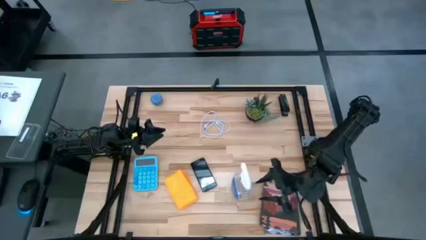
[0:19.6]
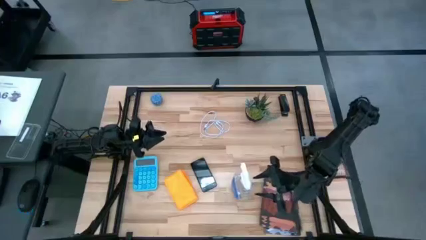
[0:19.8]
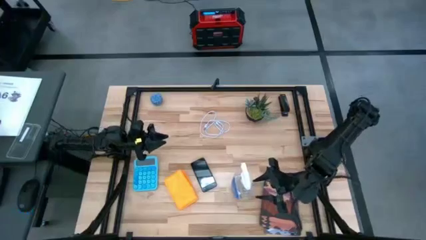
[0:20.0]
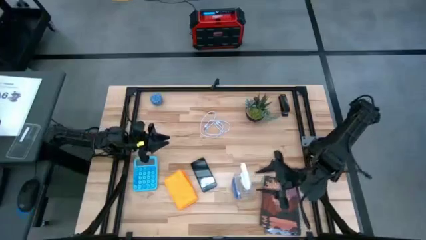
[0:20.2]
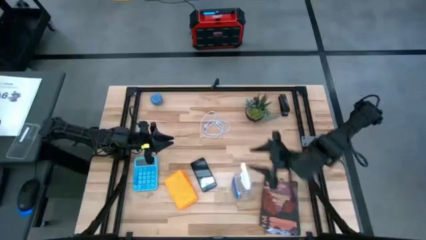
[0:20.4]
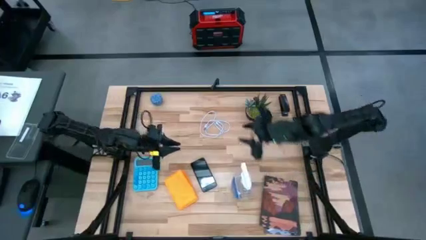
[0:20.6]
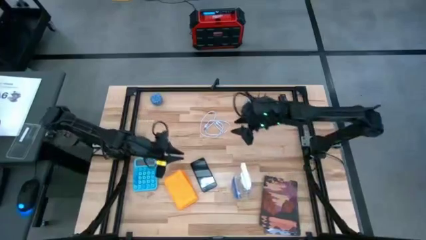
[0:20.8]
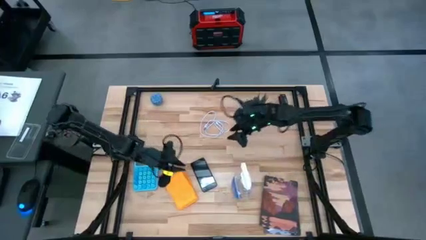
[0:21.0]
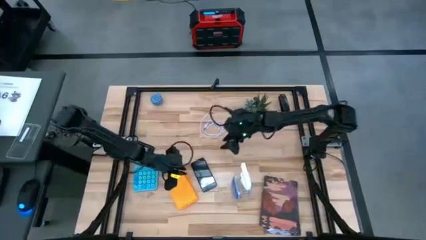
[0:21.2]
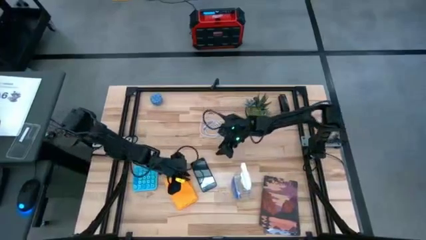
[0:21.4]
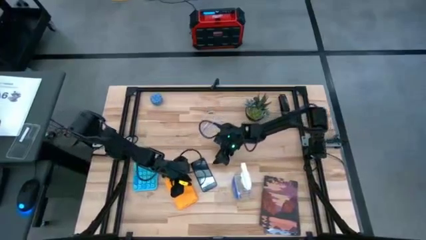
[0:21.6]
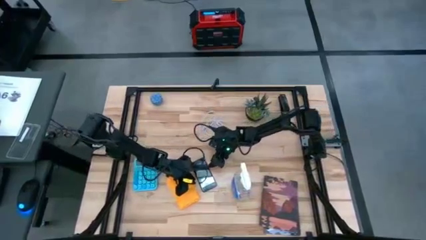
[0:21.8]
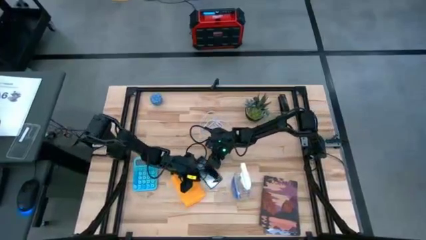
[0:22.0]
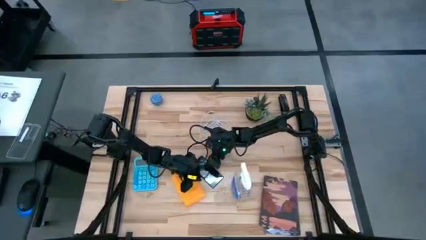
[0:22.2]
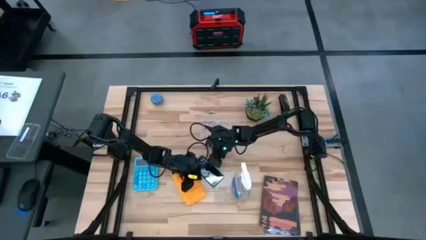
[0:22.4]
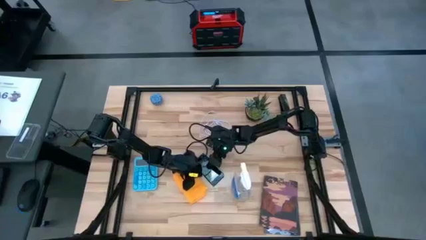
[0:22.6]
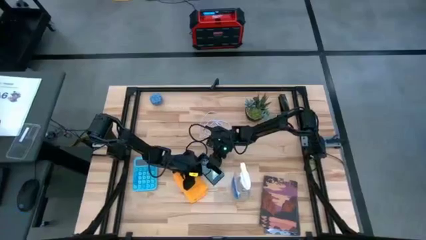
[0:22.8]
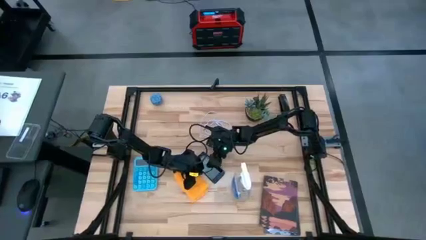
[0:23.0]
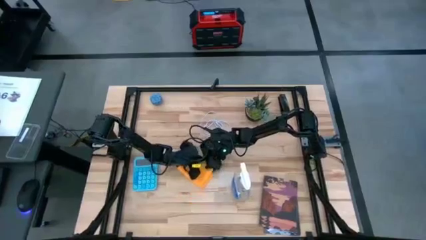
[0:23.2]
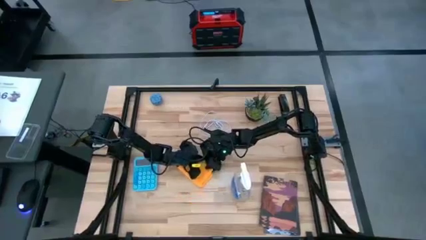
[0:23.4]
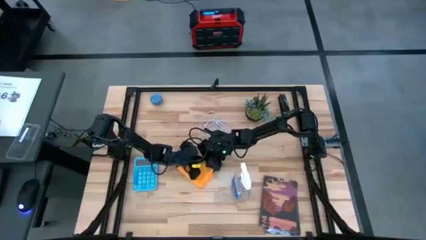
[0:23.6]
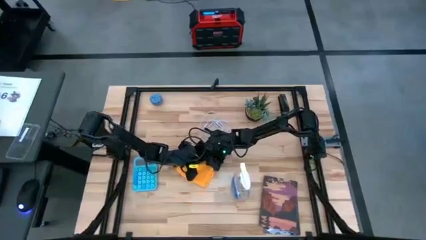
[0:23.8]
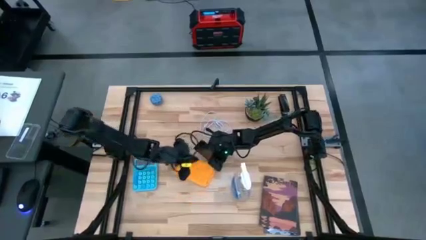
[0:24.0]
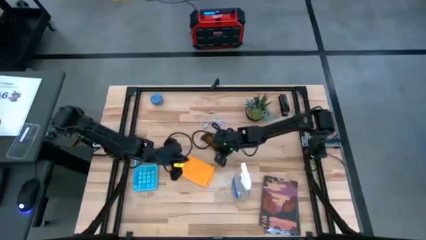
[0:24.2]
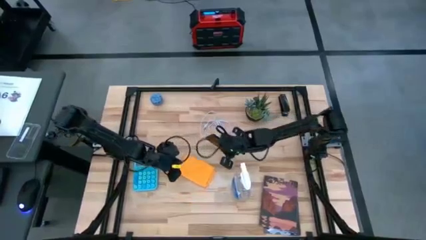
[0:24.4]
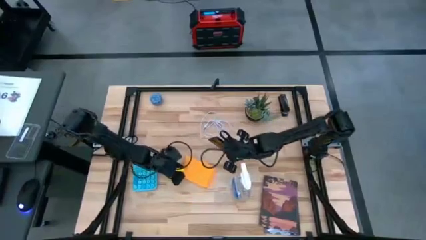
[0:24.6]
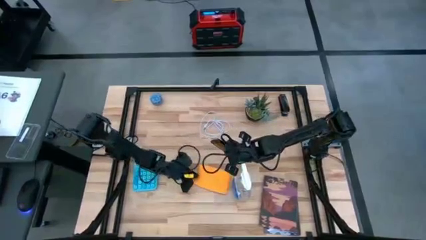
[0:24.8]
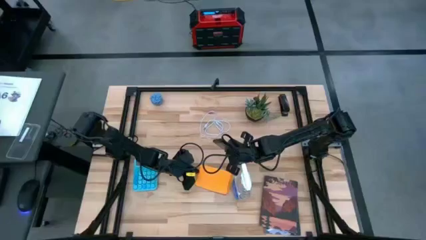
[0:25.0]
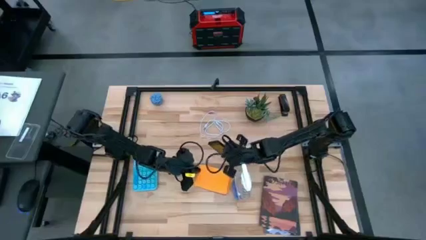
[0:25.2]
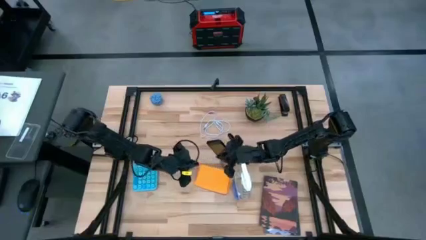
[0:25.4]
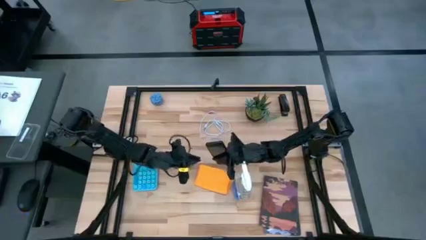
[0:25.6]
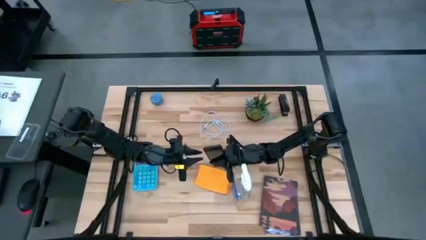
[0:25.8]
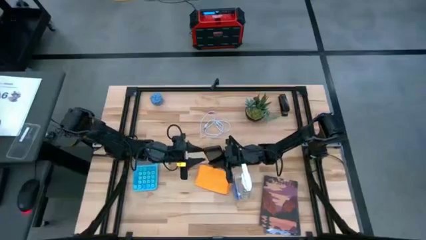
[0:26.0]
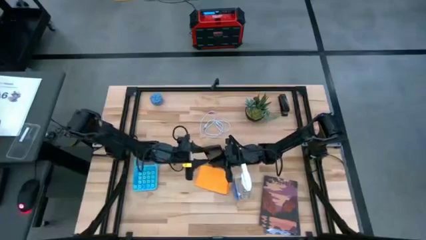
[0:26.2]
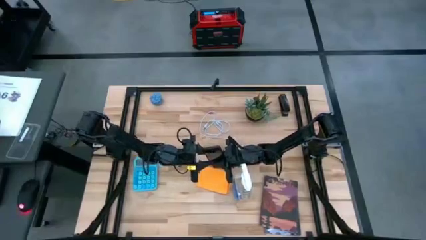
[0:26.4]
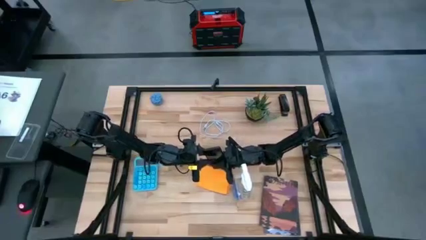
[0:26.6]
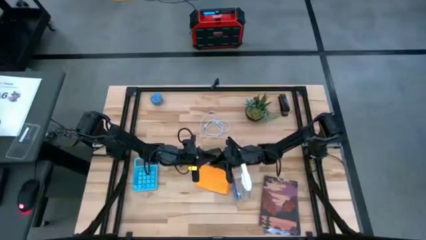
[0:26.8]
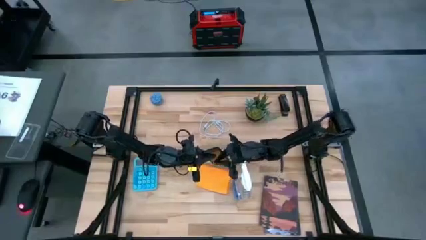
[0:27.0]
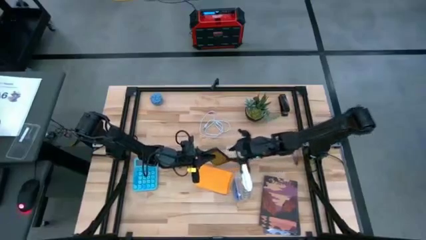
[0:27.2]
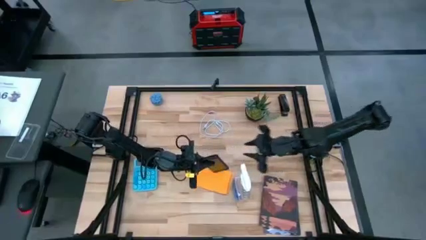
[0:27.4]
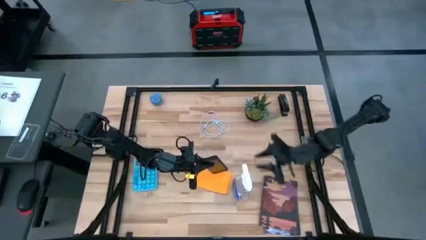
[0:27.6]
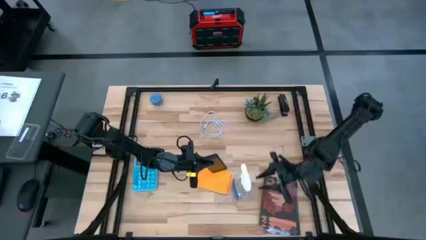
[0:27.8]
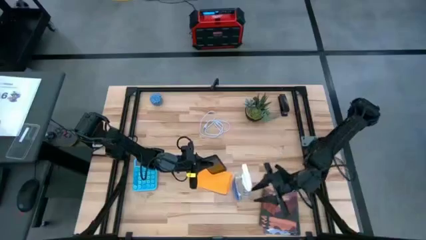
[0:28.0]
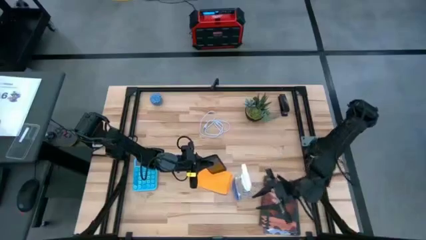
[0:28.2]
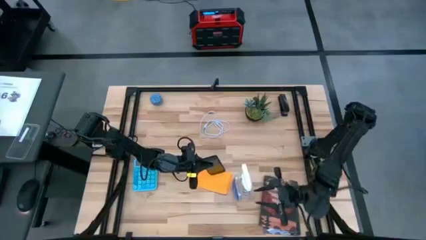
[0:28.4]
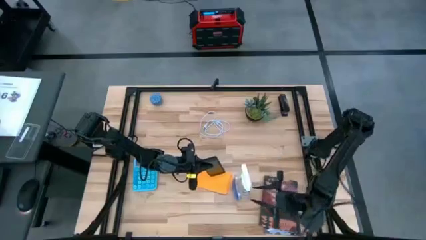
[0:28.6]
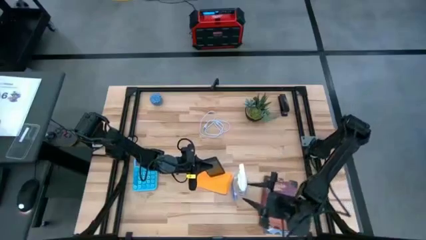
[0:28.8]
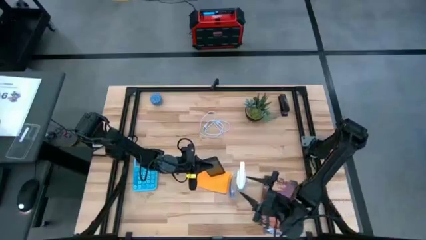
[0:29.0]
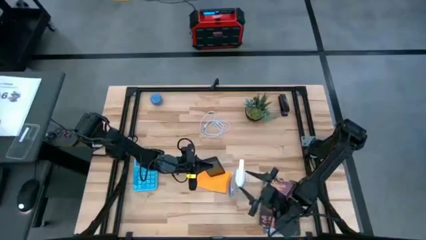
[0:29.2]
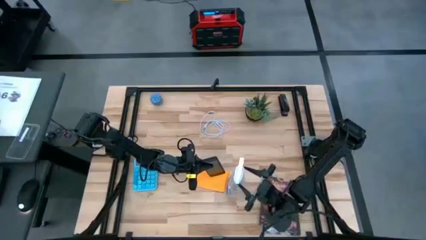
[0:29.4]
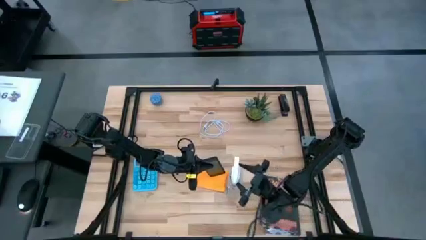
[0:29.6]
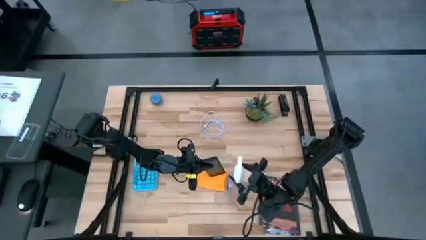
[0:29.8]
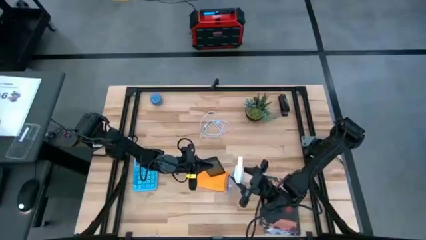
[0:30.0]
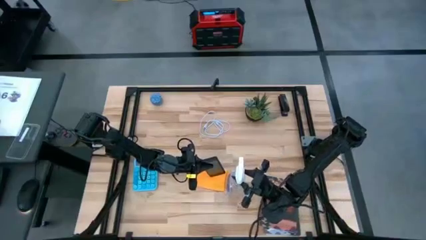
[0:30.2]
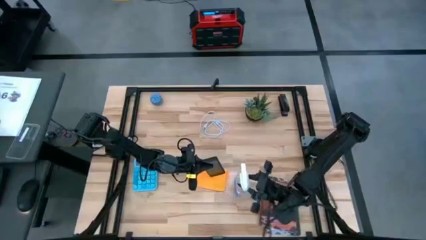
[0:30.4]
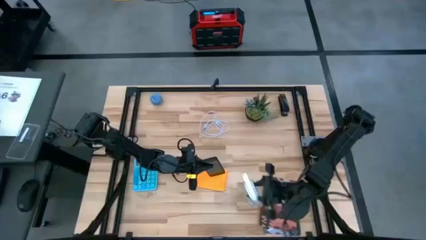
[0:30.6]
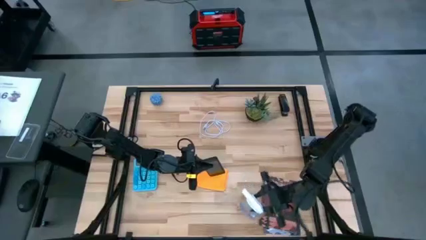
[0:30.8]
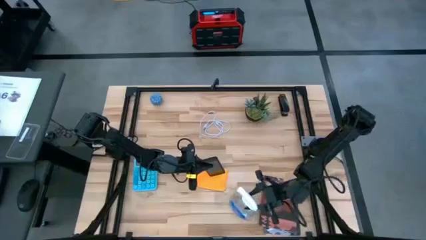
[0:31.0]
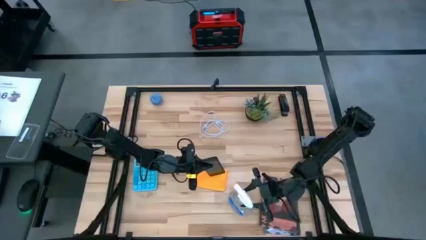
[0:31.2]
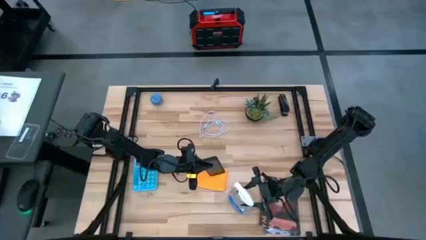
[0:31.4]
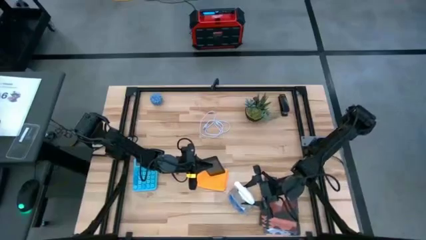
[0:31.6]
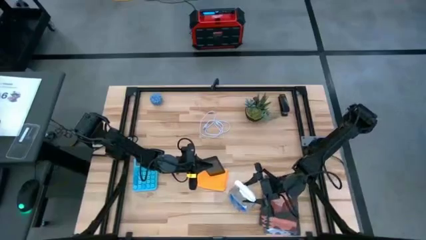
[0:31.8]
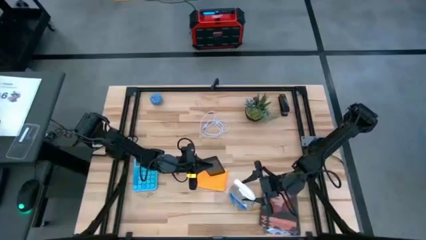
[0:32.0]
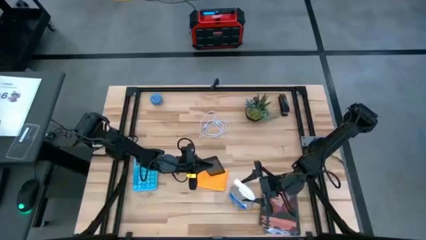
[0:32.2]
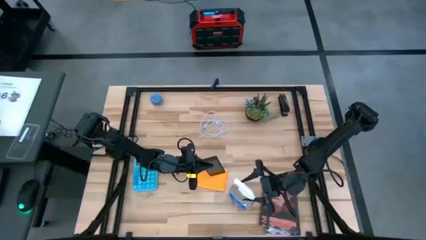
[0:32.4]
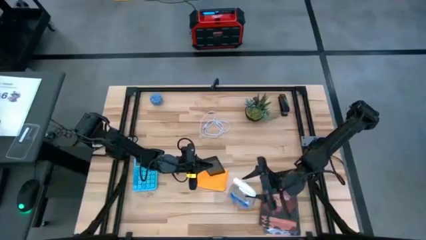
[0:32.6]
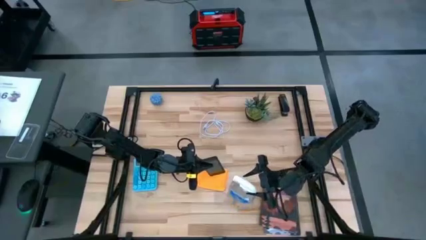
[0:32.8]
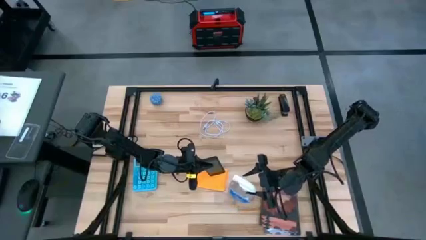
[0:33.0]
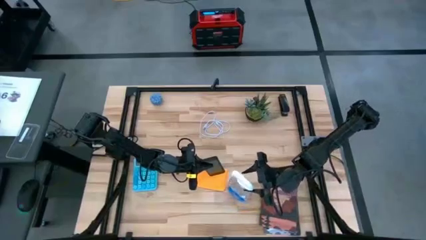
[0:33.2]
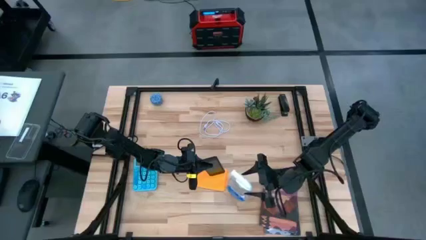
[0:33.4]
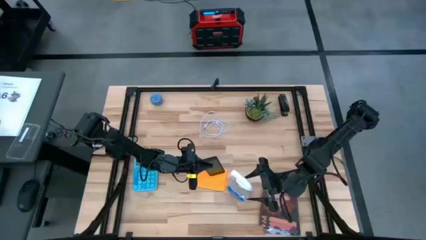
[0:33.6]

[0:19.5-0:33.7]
Task: Apply microfiber cloth
Spray the black cellphone

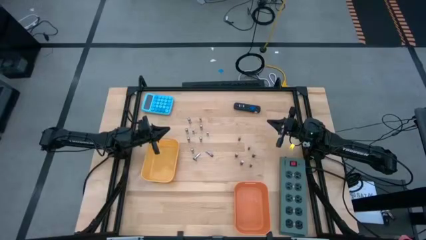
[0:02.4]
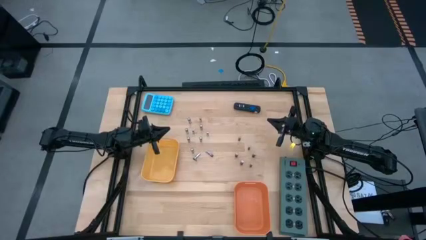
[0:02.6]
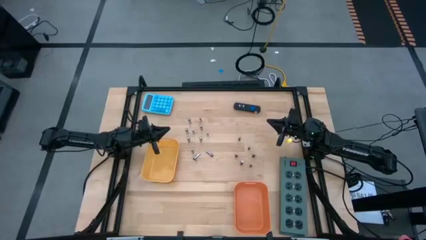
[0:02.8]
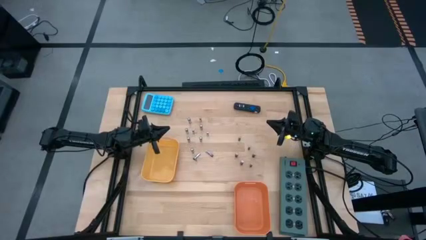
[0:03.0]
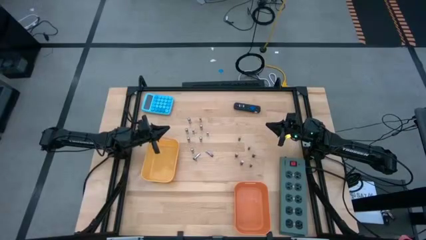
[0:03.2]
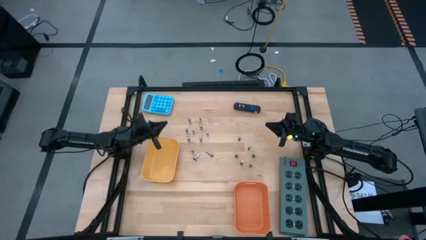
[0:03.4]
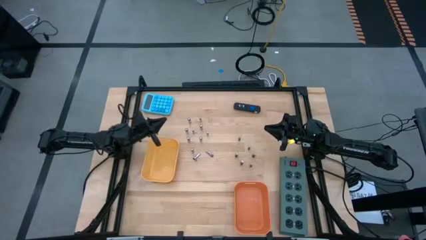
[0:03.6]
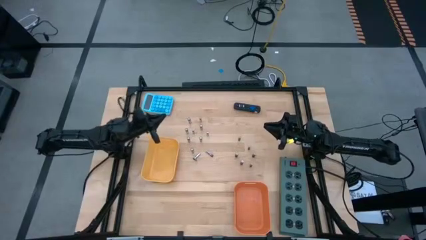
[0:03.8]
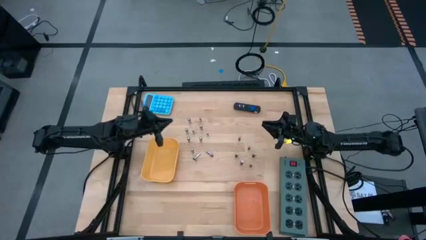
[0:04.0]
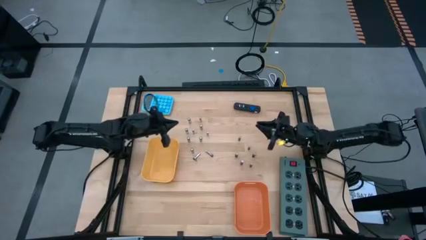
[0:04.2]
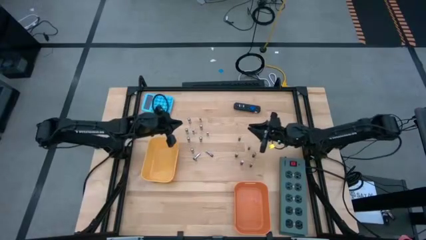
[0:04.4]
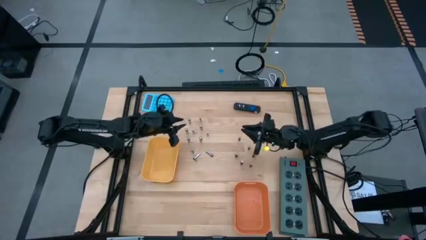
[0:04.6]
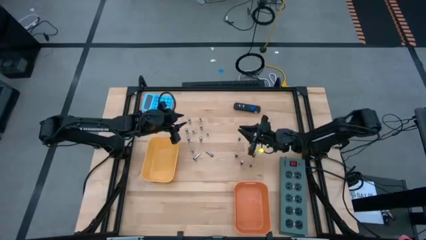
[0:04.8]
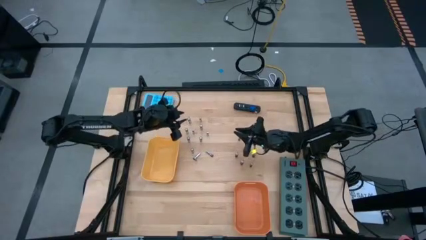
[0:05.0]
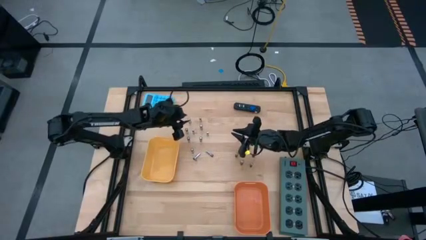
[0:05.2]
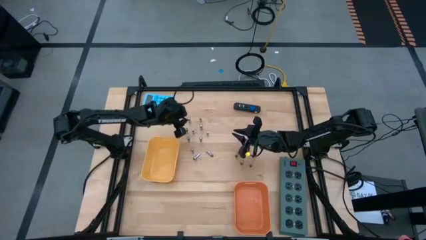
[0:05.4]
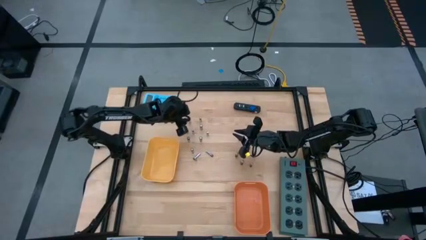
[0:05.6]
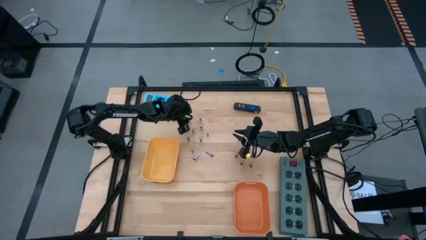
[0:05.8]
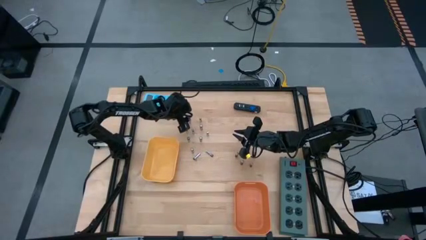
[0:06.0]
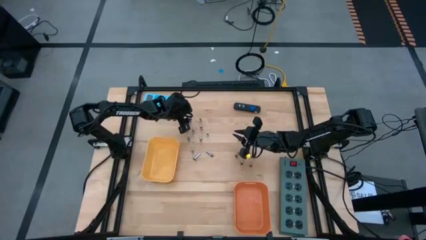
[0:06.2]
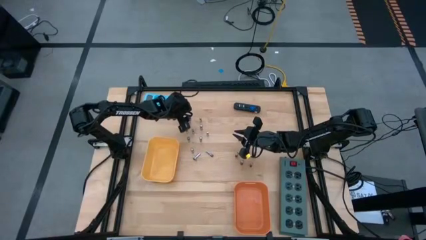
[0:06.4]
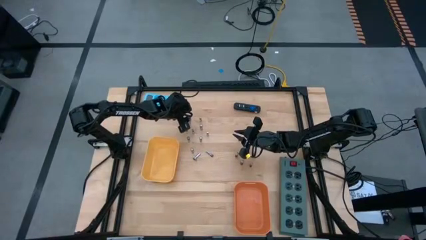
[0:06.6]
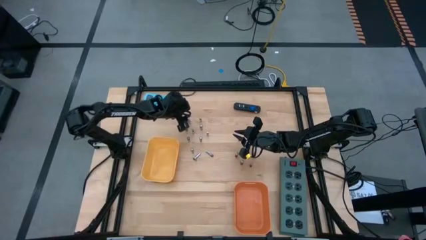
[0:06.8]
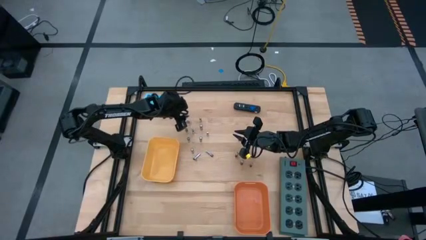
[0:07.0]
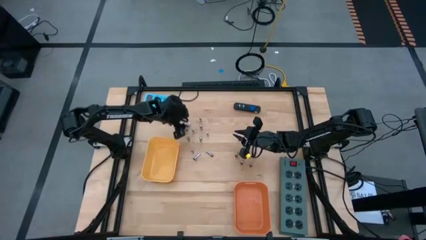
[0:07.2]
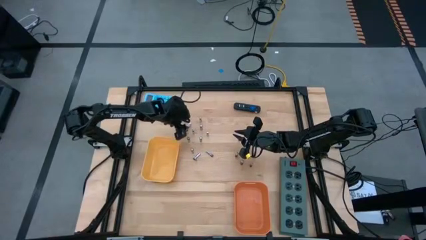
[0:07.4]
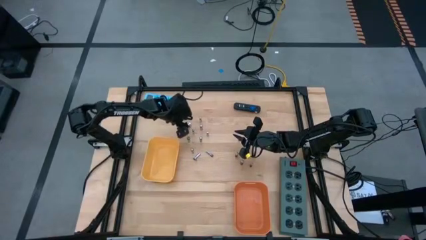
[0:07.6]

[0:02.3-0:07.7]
Task: Sort batteries
Put the silver battery into the yellow bin
